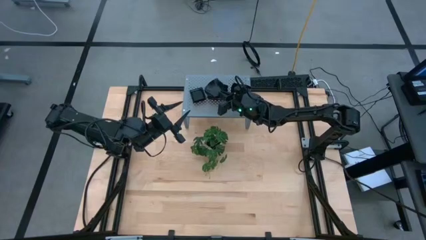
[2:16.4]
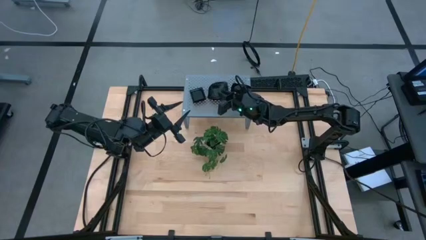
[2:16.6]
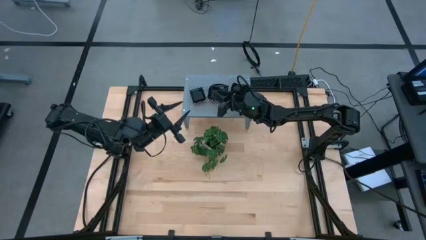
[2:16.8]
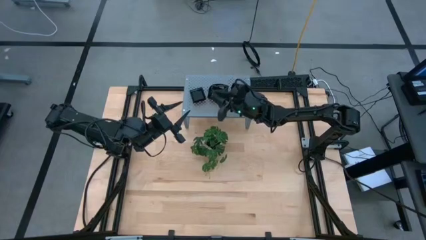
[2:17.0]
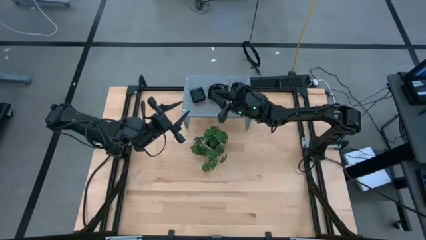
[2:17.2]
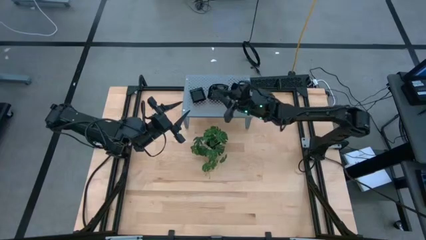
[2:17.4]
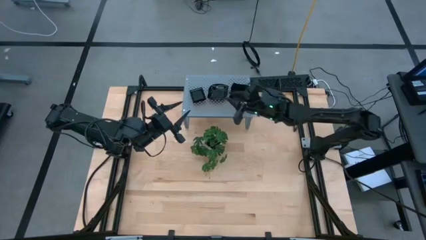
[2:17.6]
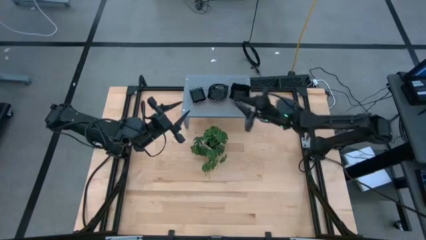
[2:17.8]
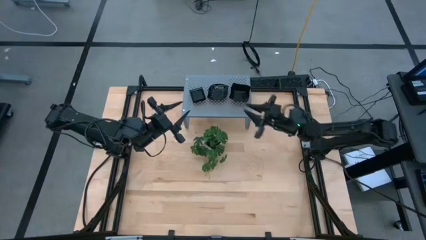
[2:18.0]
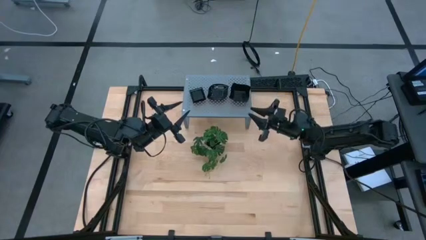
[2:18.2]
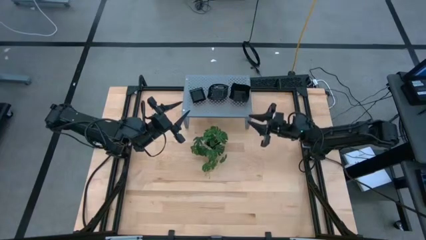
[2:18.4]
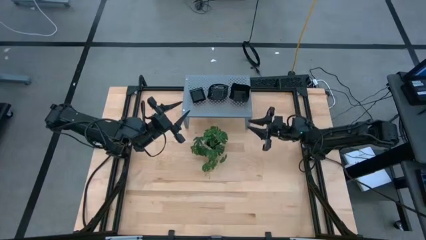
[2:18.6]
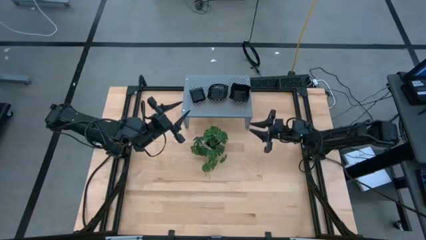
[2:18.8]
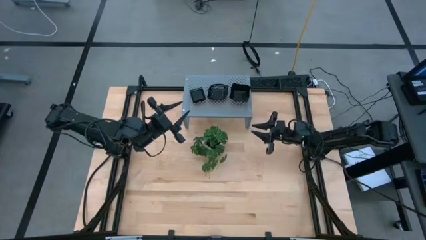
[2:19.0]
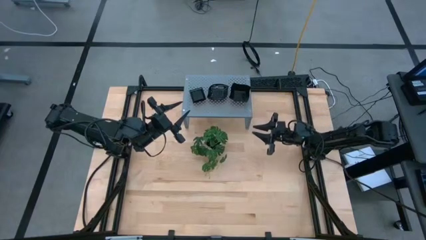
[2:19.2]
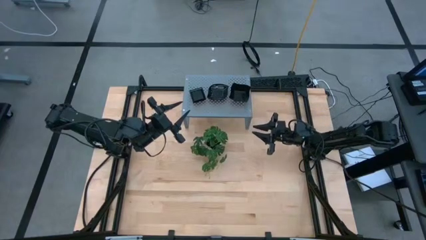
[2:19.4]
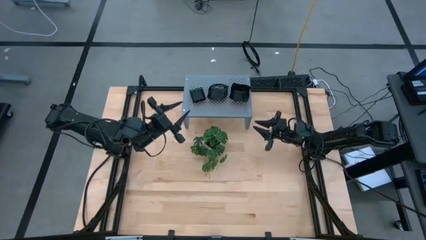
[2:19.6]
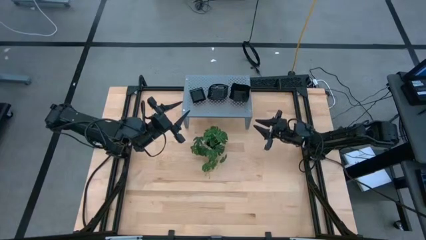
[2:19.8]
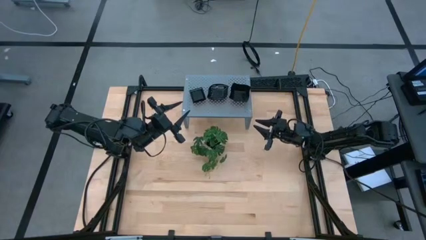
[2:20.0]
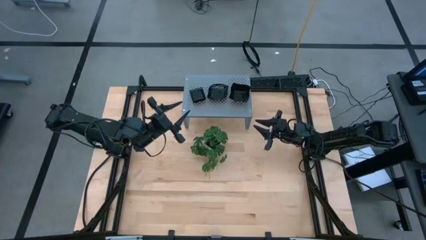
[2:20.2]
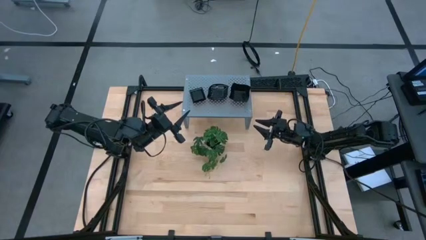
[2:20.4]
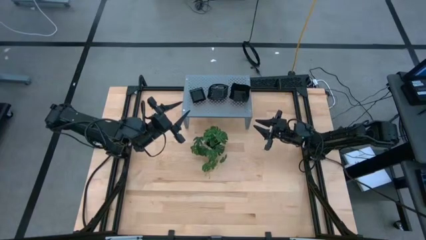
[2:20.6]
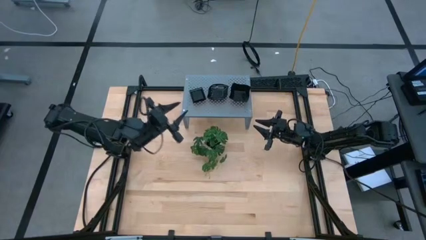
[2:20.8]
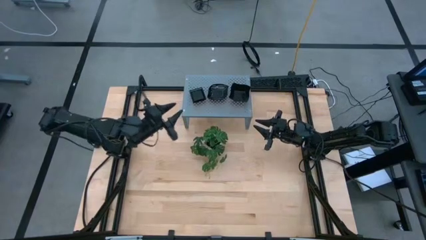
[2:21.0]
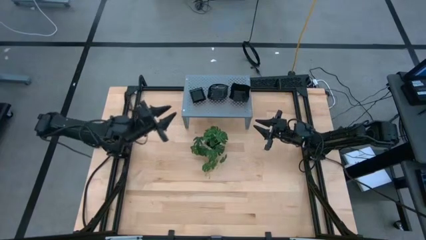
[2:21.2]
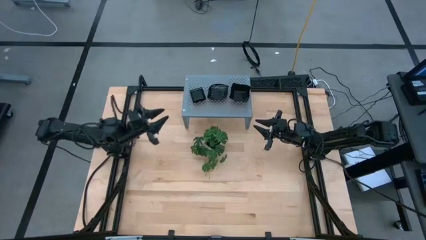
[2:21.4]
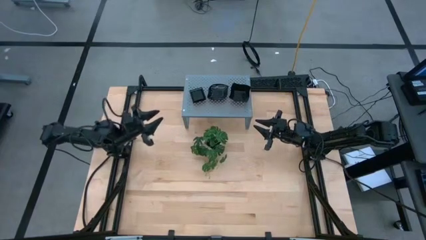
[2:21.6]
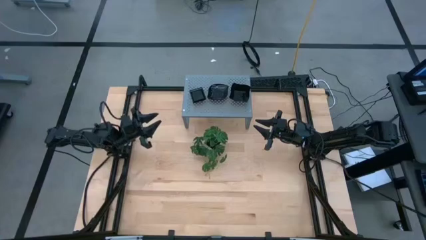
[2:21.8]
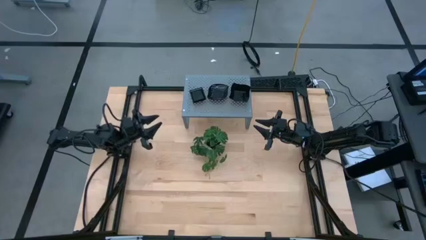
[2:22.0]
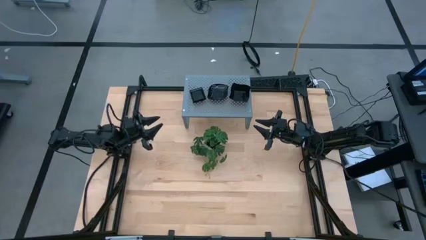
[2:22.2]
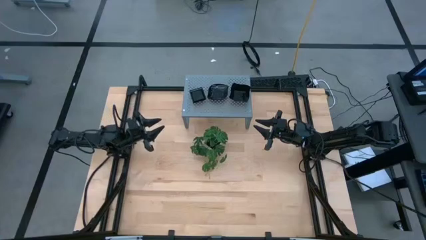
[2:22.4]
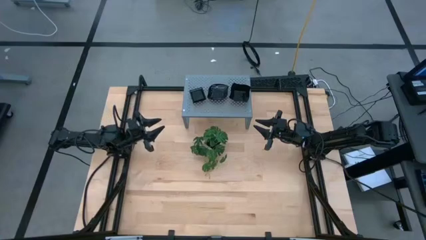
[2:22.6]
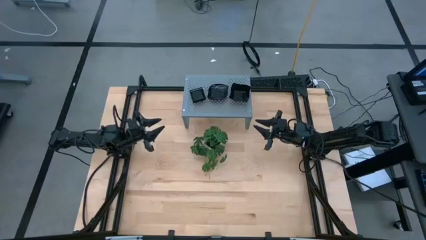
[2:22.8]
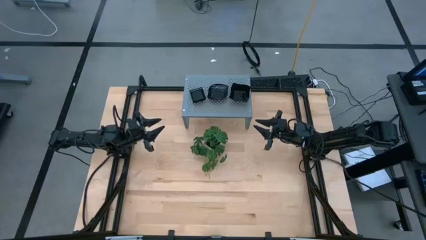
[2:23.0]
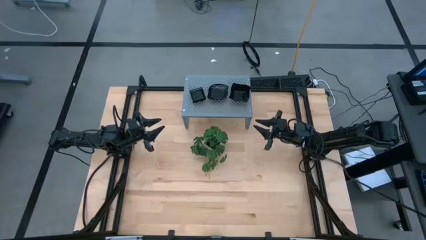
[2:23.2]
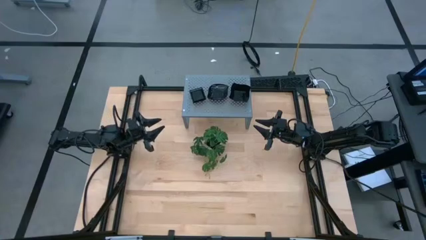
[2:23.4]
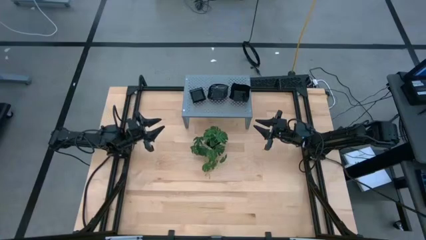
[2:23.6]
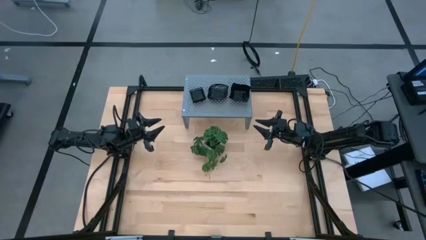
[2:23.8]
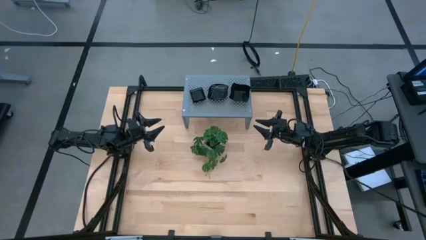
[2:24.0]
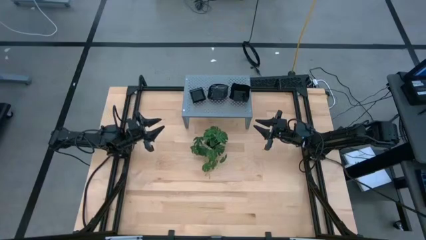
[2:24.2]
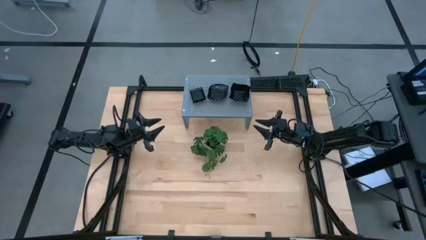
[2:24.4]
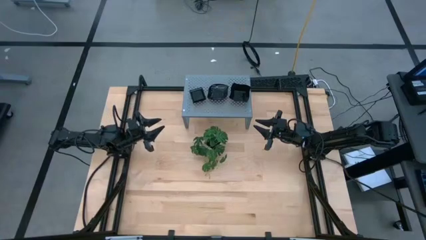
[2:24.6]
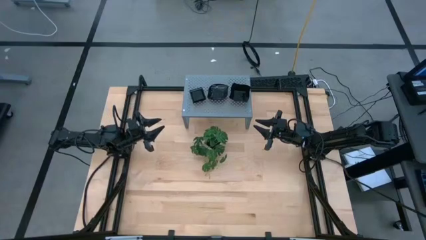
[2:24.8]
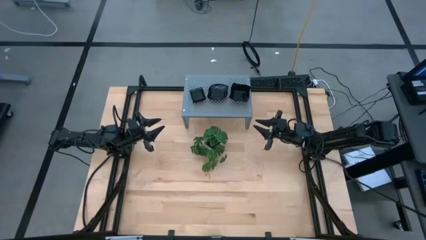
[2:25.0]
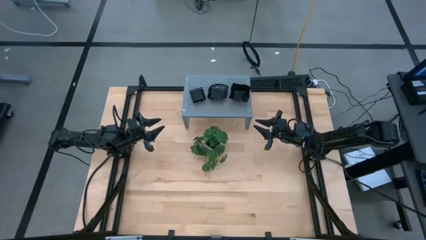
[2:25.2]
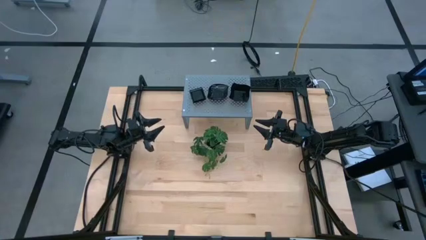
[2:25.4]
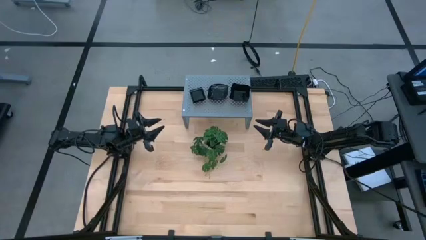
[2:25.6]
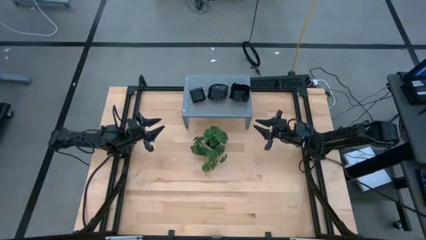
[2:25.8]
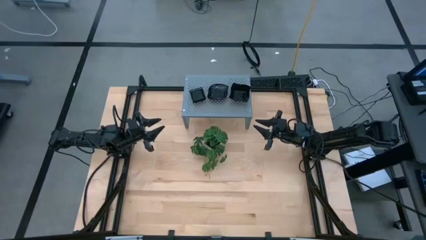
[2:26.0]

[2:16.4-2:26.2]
Task: Pick & Place Mini shaped plates
Return to Home Position

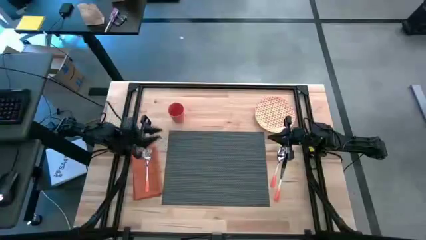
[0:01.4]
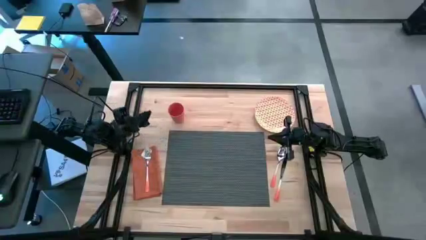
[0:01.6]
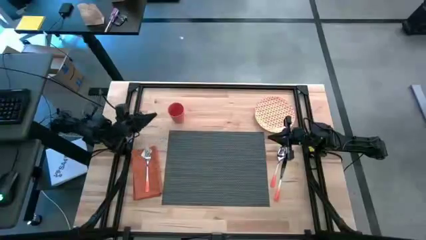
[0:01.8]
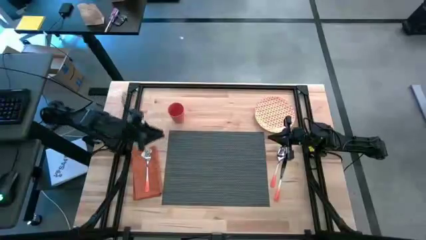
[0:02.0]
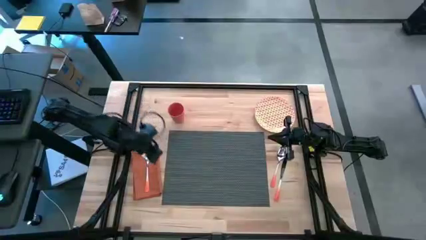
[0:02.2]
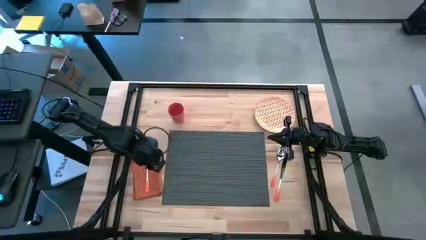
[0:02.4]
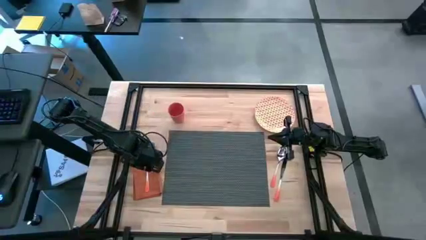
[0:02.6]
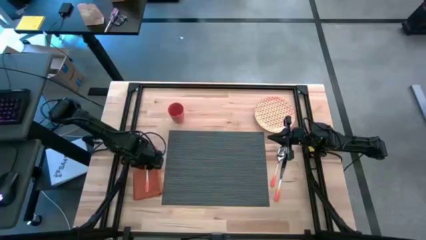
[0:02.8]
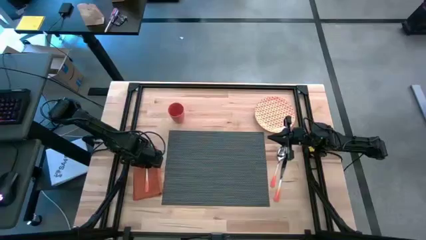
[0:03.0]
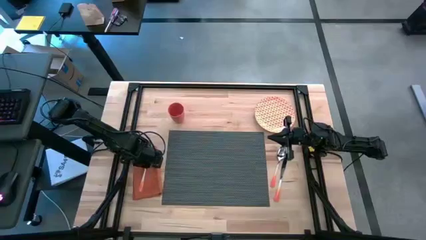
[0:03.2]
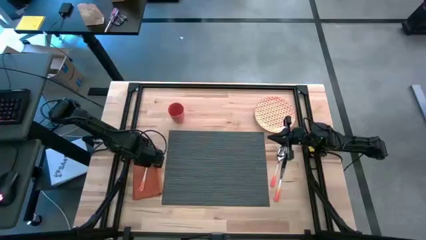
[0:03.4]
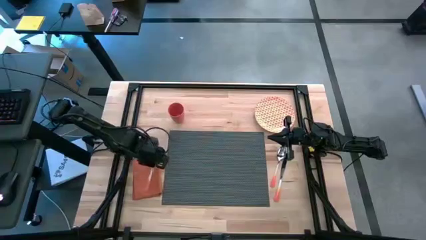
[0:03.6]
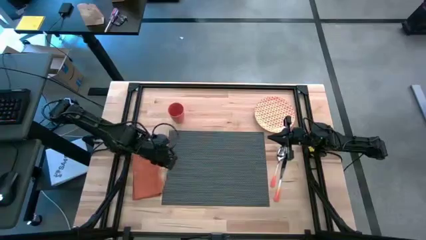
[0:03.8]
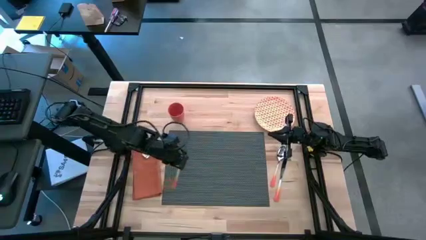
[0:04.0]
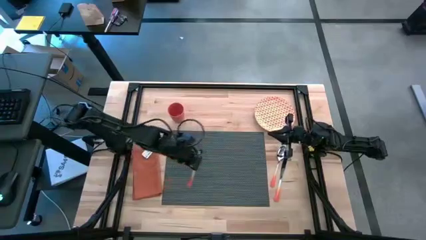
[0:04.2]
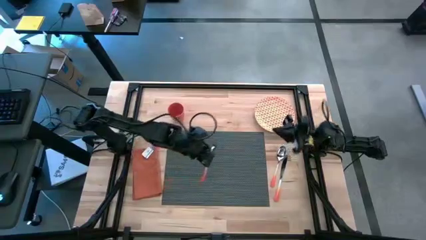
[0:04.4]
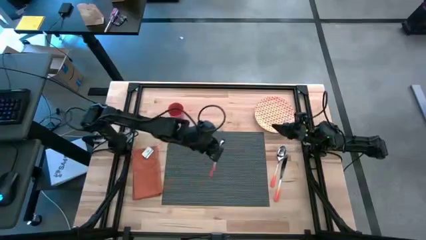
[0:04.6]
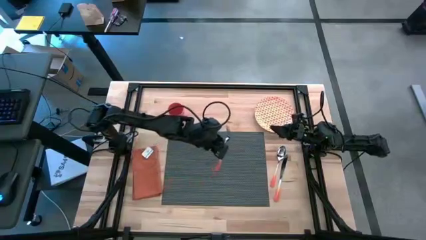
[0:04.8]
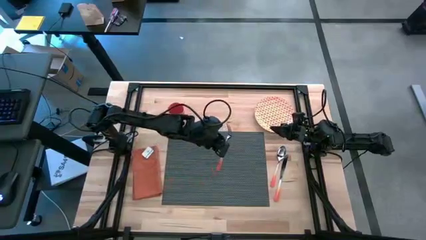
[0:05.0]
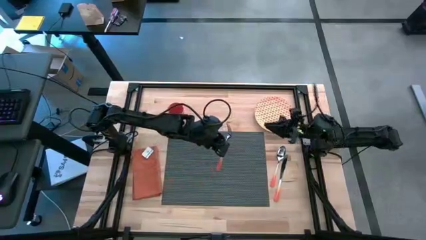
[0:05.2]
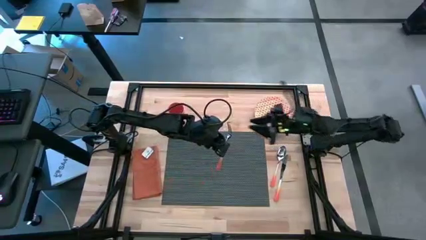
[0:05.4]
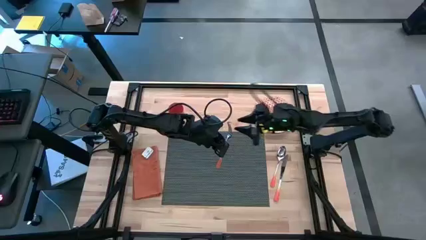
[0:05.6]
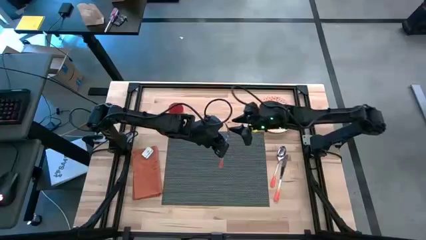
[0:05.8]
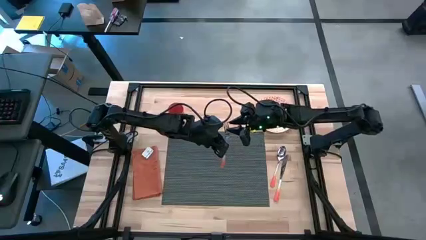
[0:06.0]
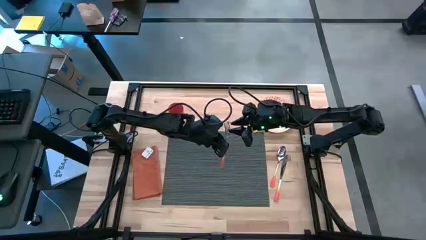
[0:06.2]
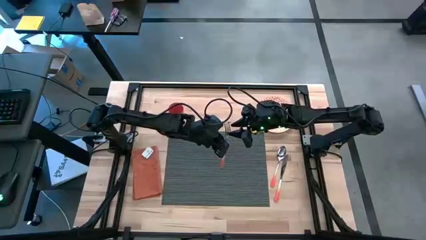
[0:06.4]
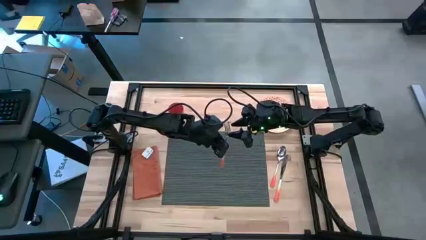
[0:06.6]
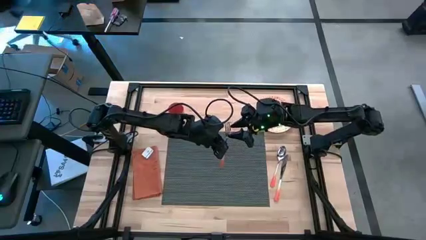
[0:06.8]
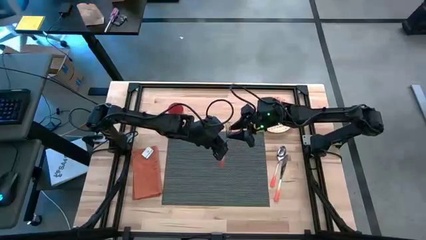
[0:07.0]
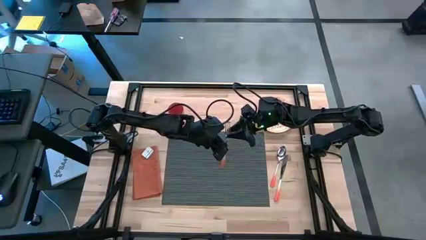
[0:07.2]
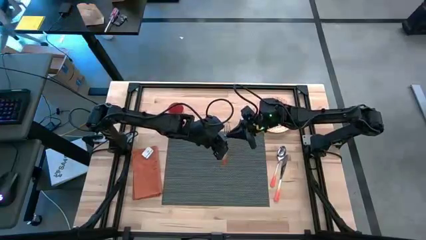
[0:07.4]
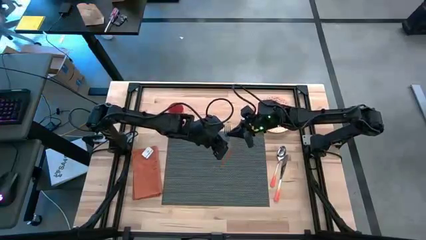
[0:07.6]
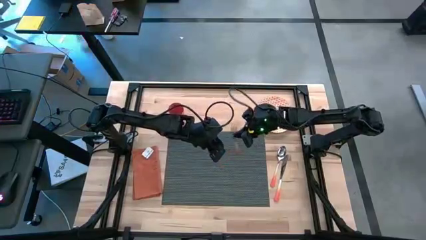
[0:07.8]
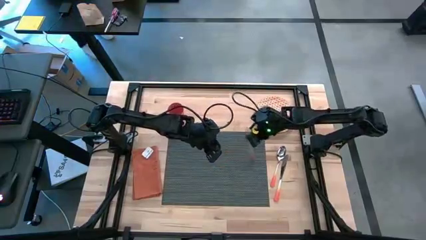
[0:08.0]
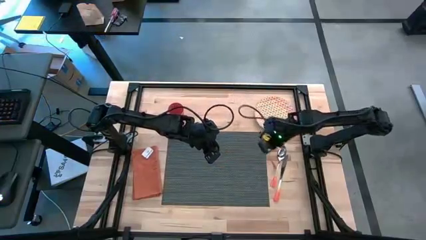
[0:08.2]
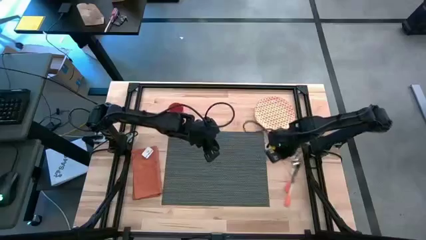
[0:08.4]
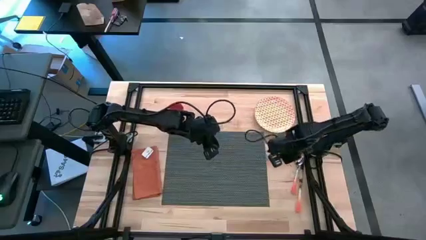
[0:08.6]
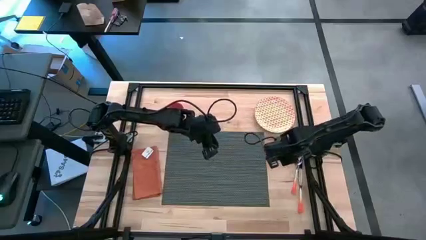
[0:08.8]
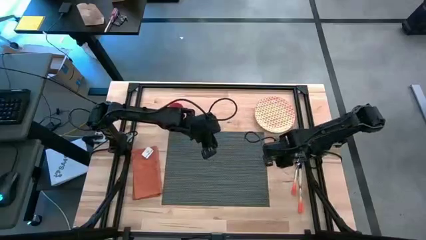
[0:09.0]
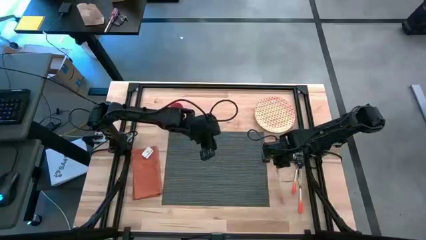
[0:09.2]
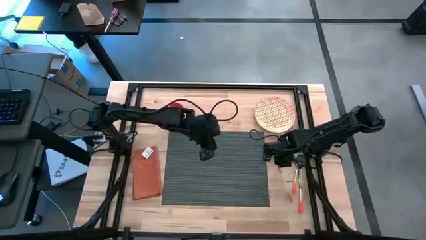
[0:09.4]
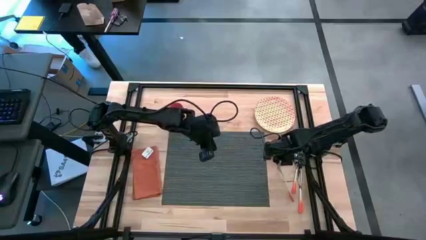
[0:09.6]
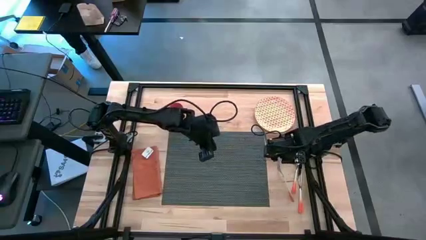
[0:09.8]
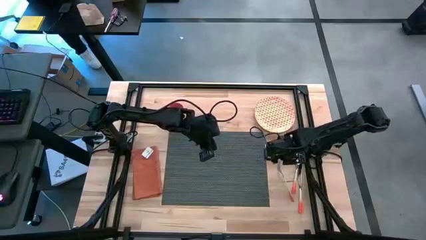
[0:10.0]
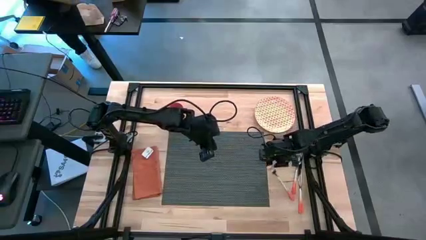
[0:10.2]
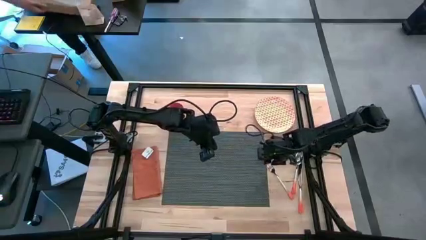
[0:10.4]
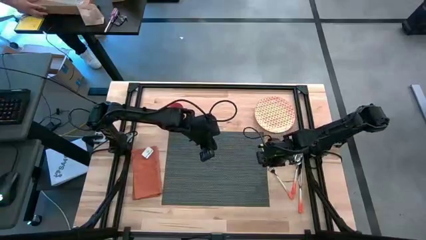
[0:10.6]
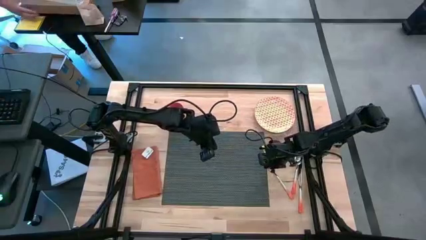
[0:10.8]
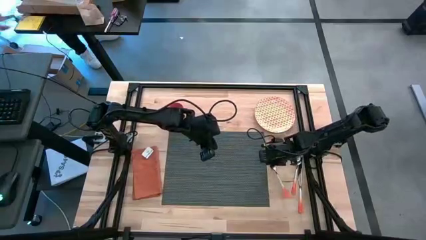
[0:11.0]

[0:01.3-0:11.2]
Task: Set table place
Move the orange fork to the middle right of the table
